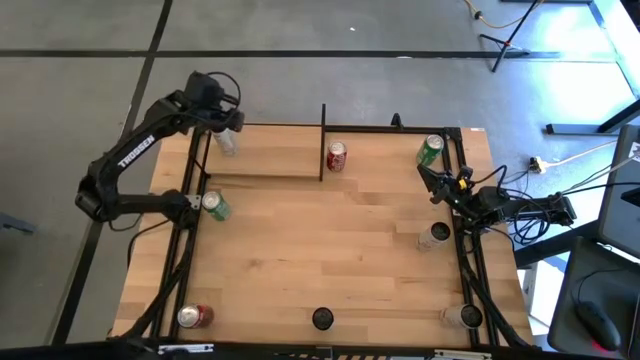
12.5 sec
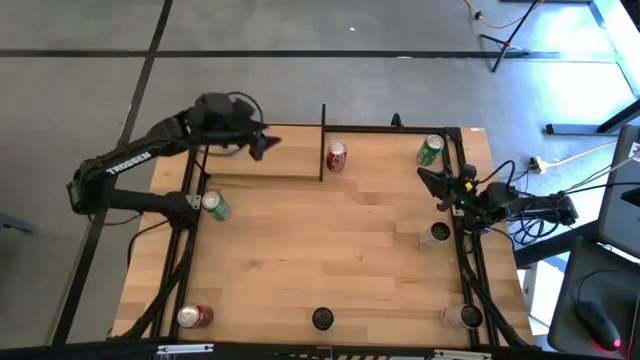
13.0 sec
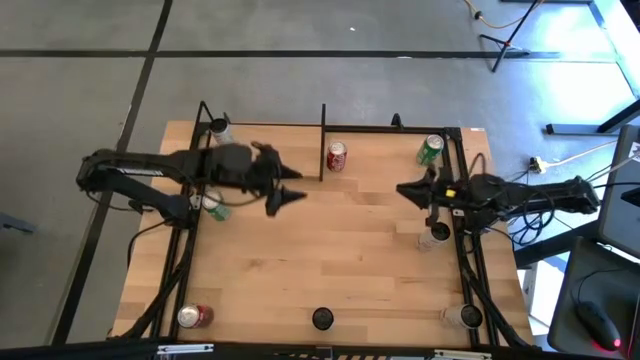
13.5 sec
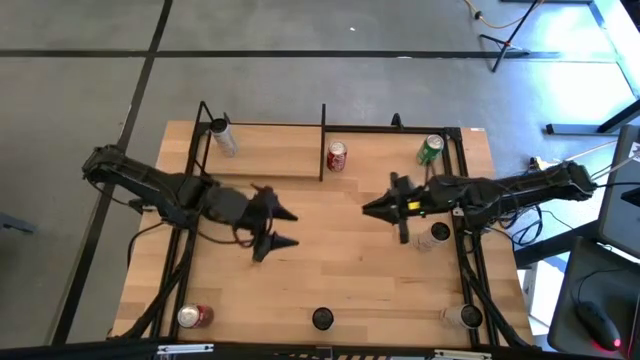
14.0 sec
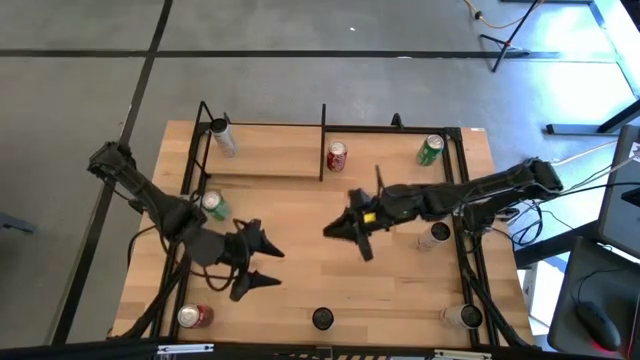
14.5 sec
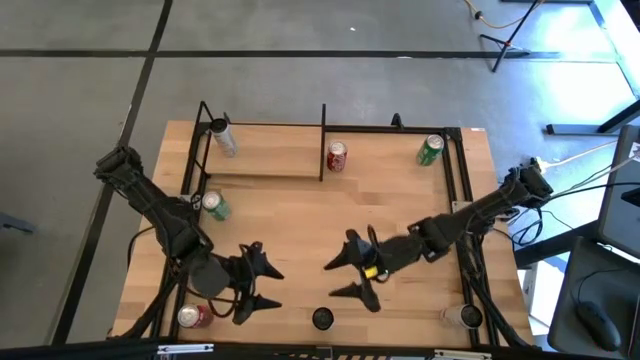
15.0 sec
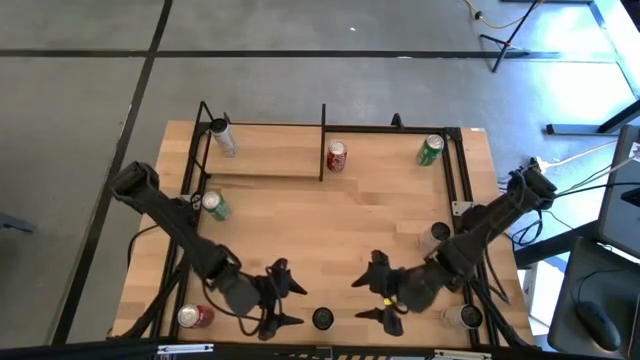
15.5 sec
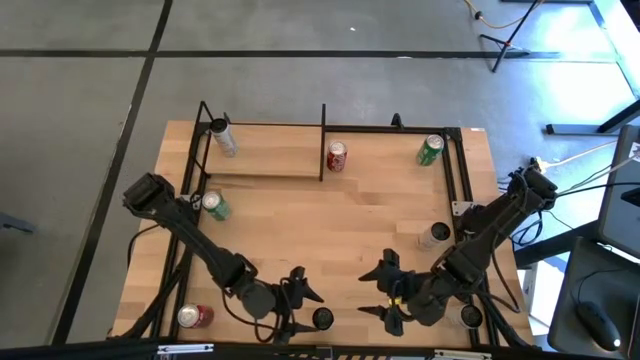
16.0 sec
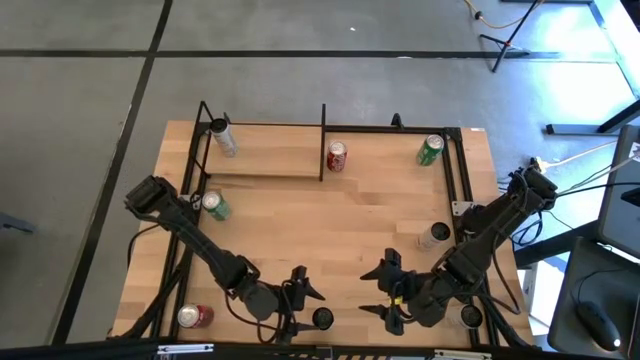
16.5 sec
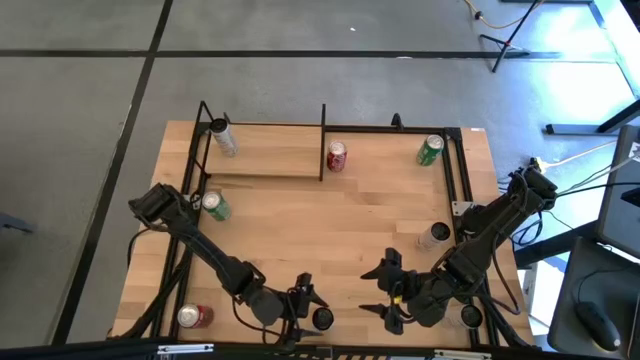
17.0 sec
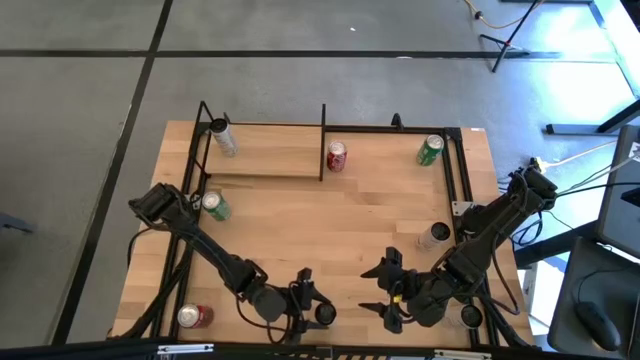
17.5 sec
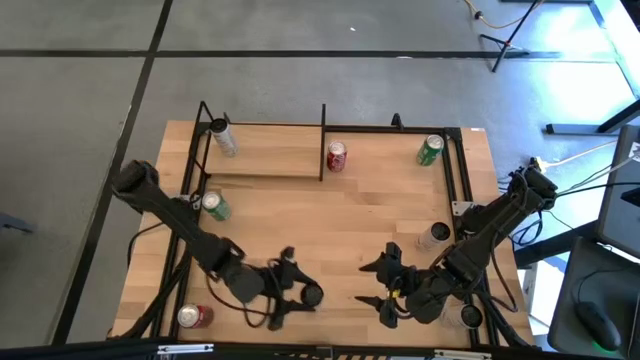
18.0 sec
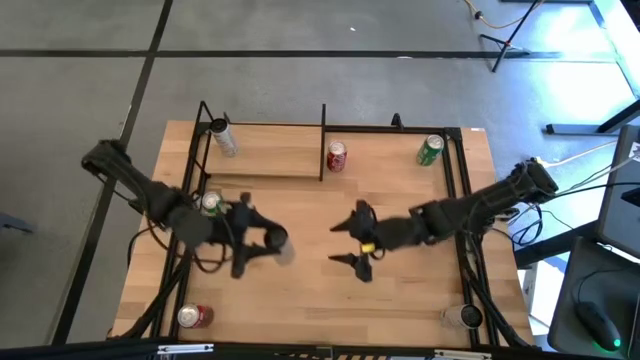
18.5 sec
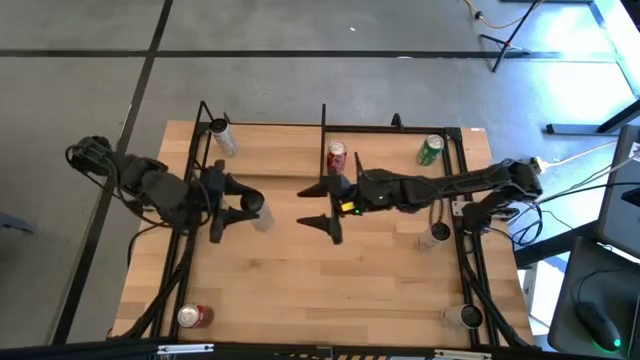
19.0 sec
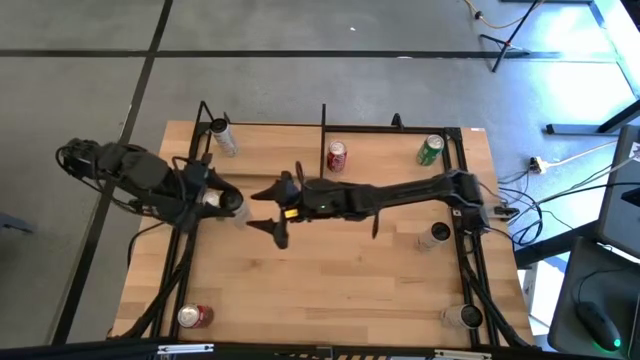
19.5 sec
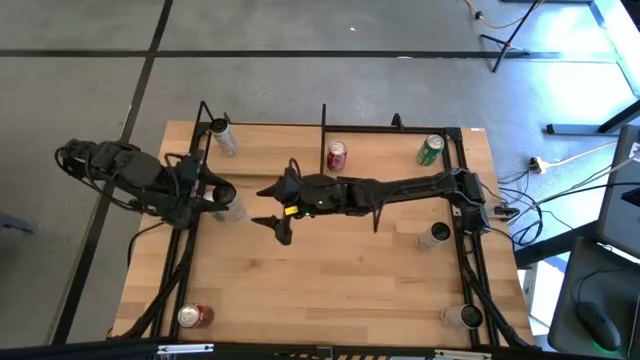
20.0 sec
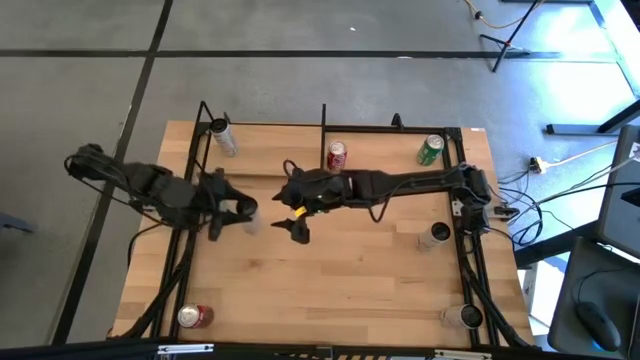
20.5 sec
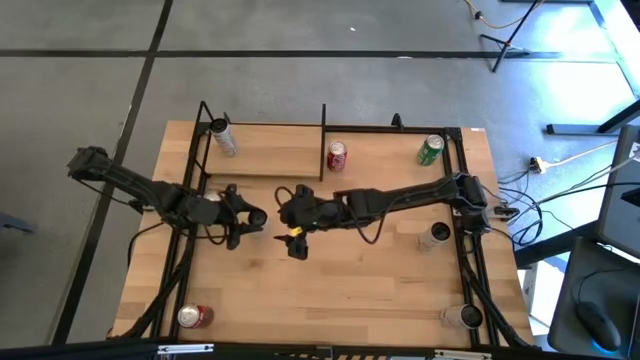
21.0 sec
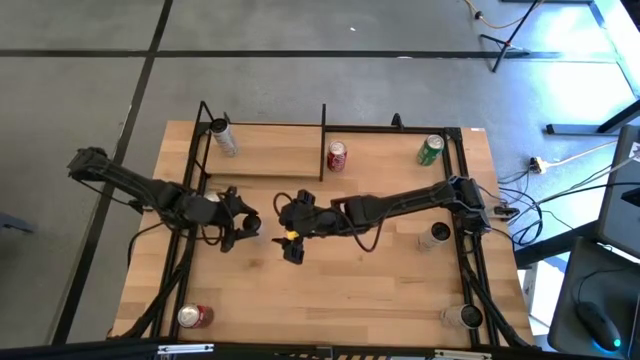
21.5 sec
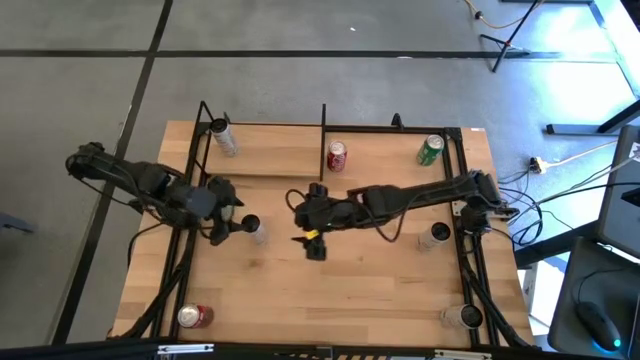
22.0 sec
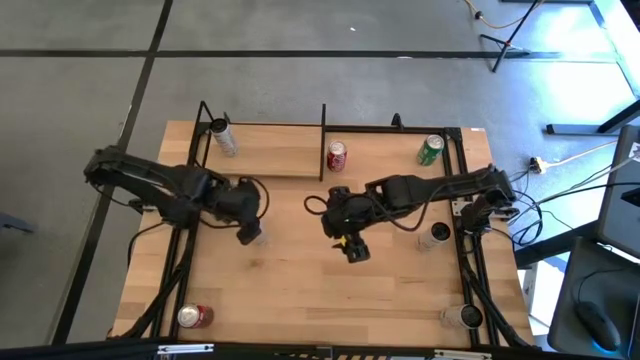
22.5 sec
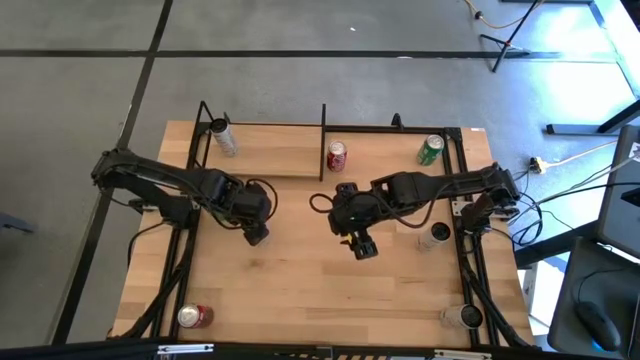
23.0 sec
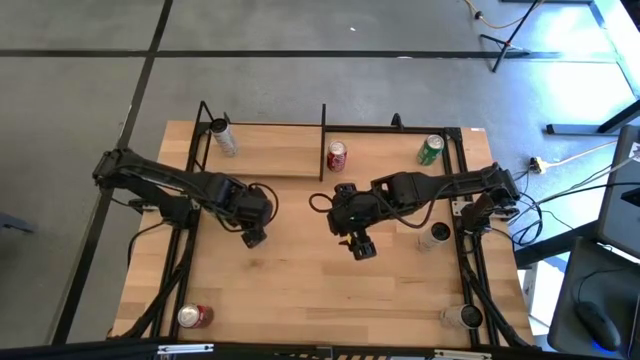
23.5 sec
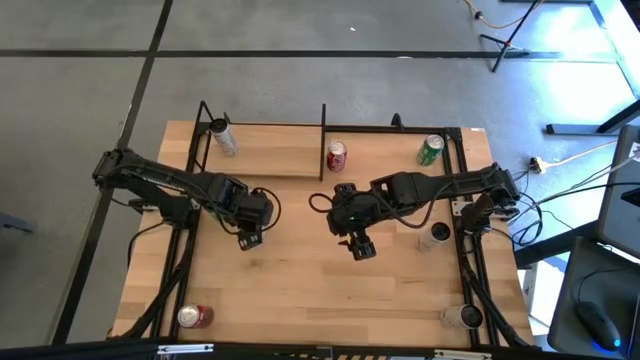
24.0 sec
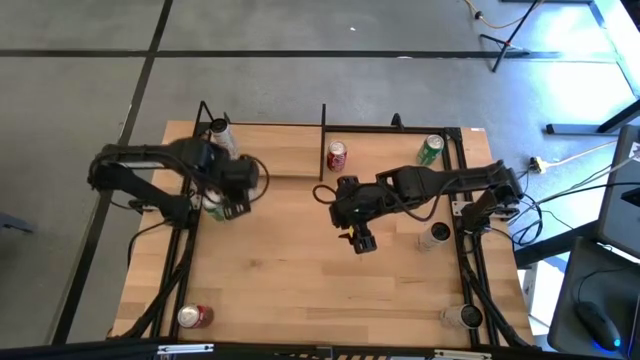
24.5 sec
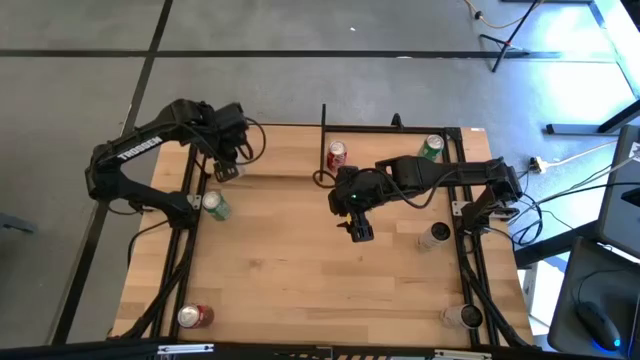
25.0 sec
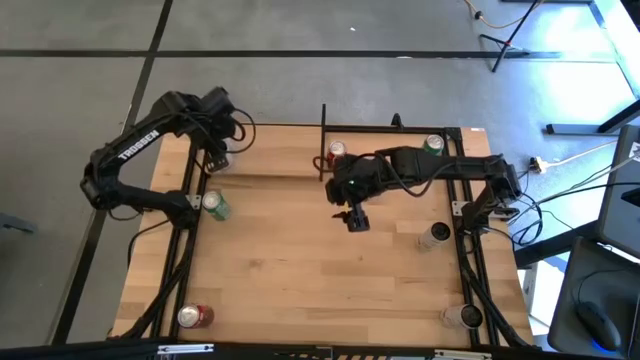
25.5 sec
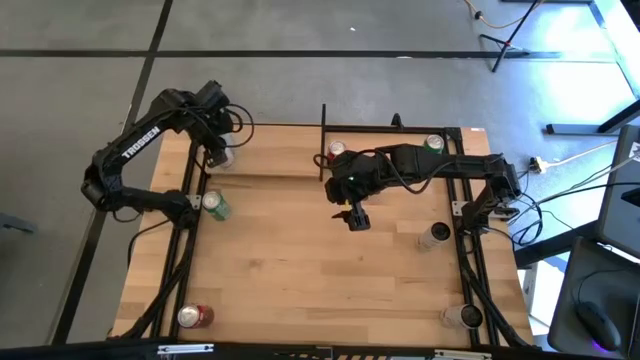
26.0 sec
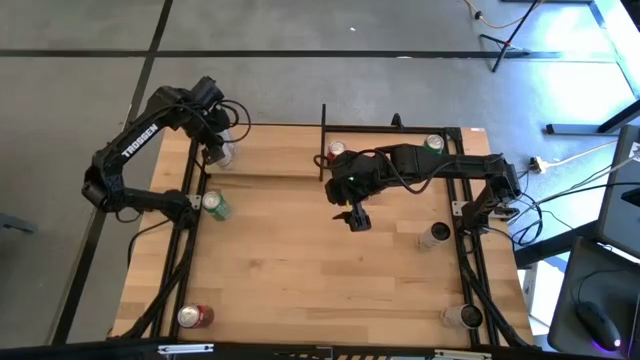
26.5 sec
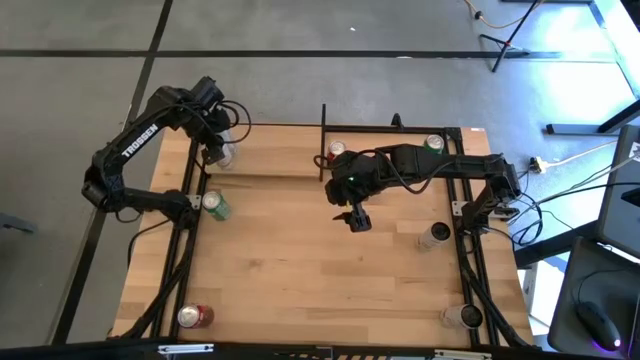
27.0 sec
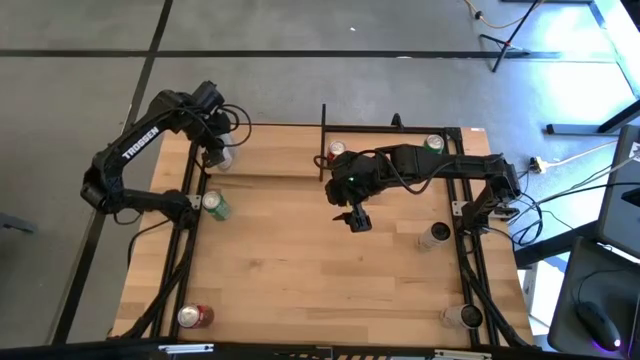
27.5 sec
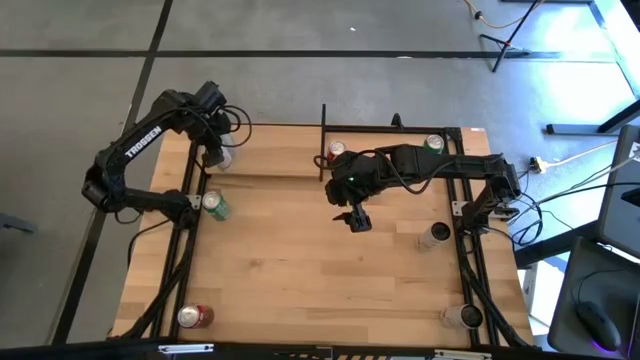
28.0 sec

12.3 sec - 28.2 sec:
Task: Place canned beverage on shelf
Put the white-yellow soda can on the shelf

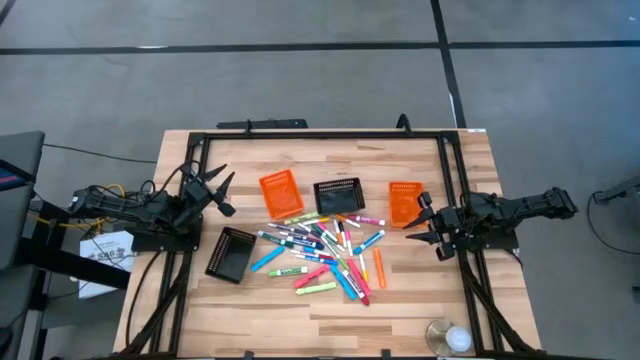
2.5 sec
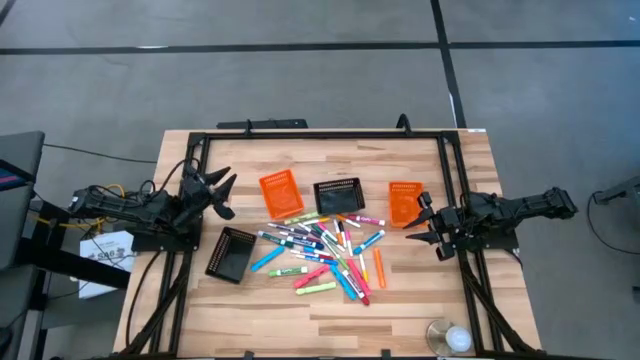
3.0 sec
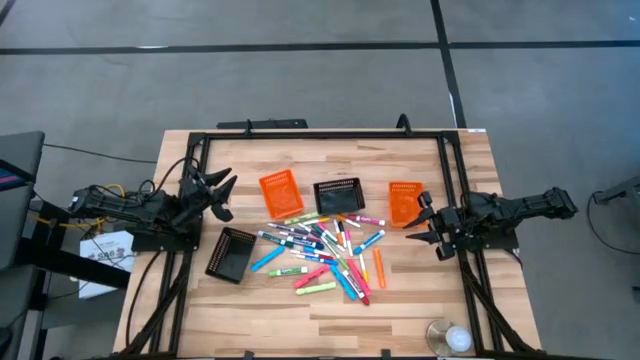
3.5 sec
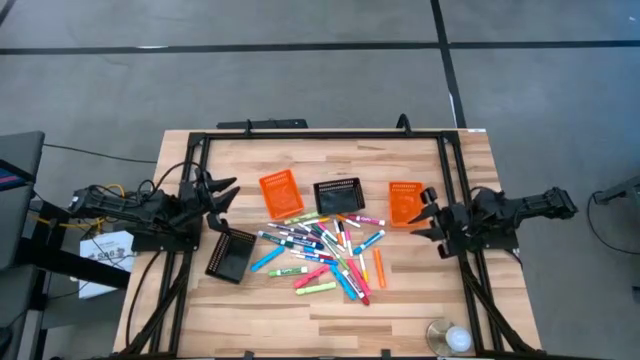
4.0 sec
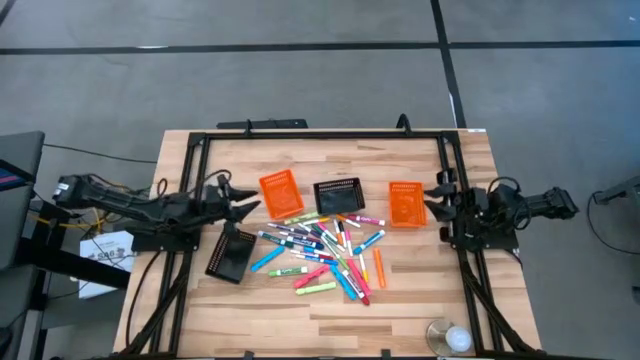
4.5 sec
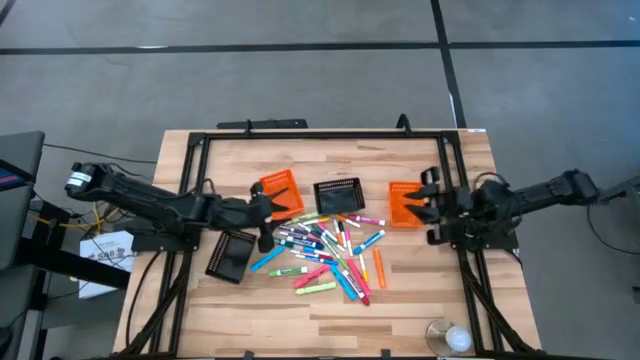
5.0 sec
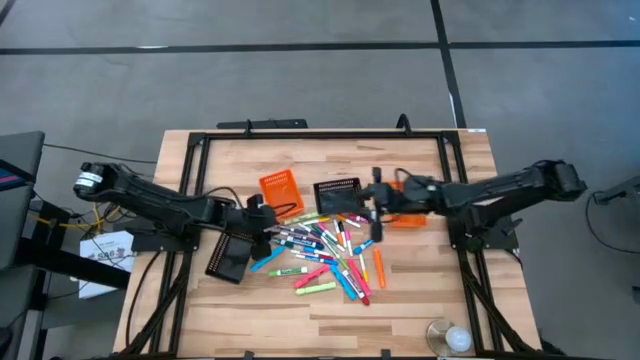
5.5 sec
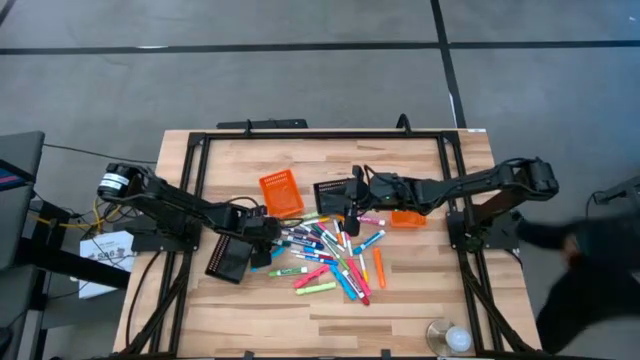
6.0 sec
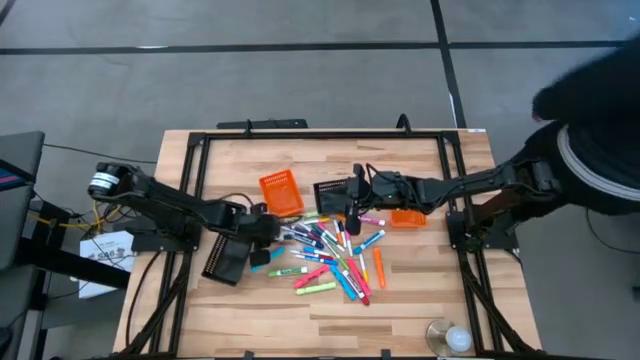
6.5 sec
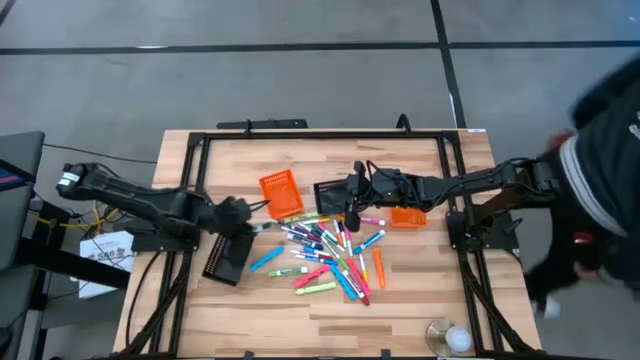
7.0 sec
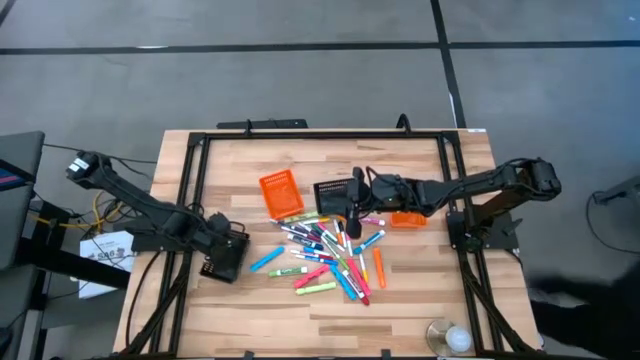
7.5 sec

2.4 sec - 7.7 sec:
Task: Pick & Place Markers
Put the green marker into the bottom black bin
